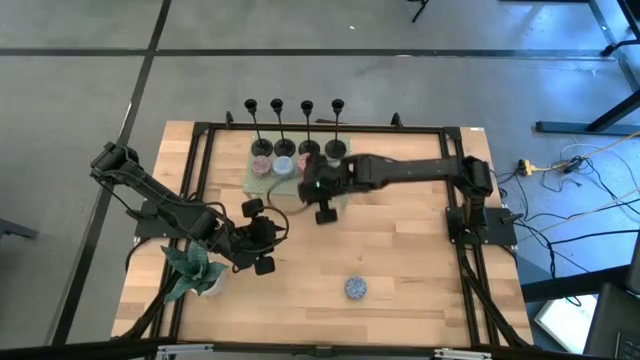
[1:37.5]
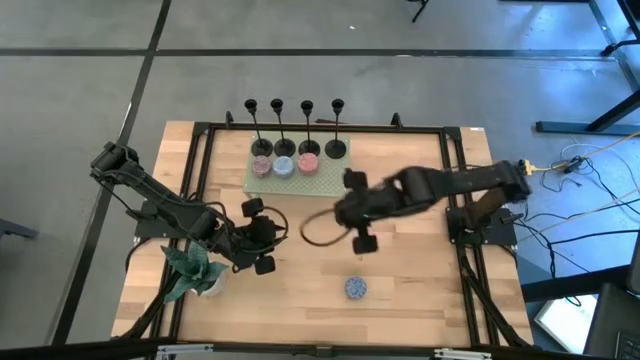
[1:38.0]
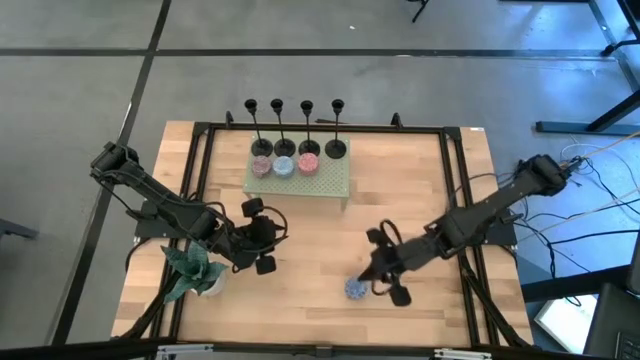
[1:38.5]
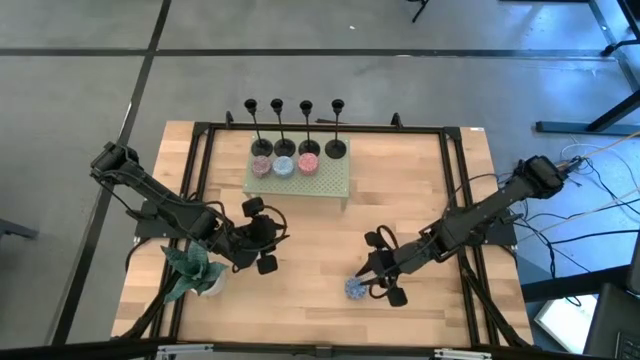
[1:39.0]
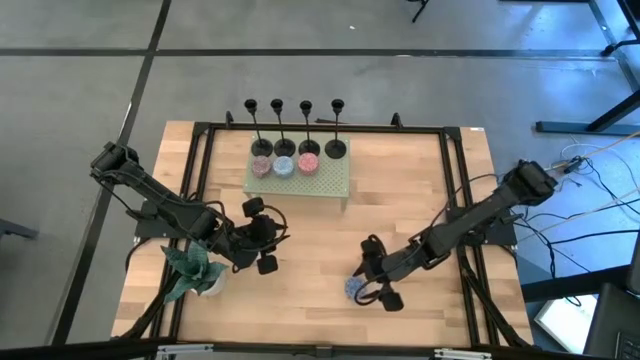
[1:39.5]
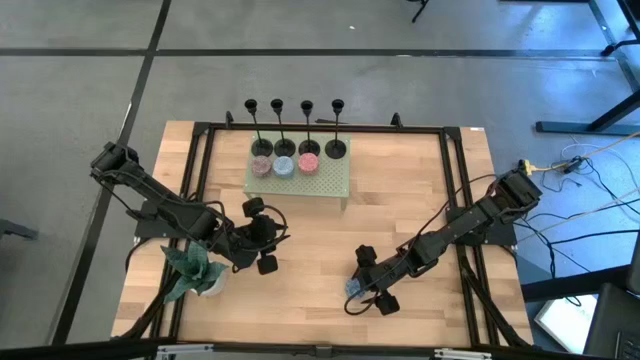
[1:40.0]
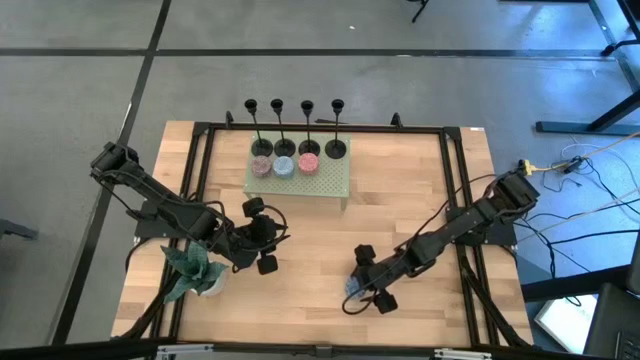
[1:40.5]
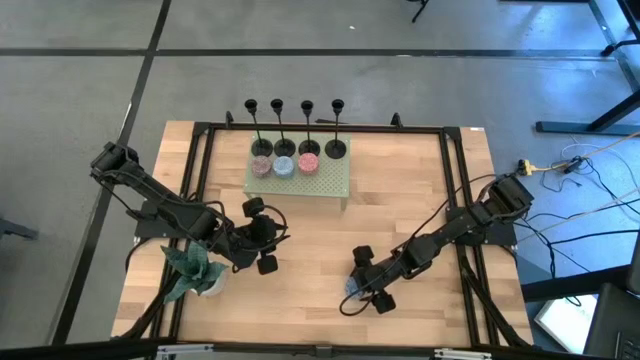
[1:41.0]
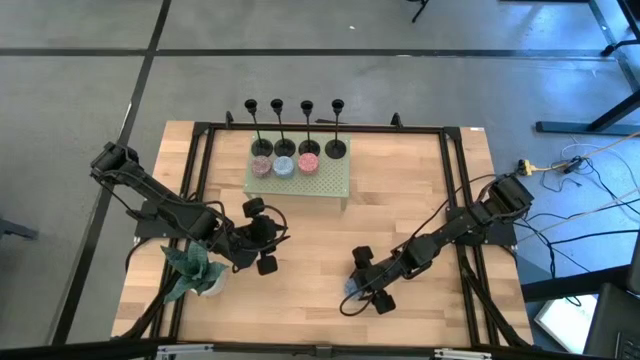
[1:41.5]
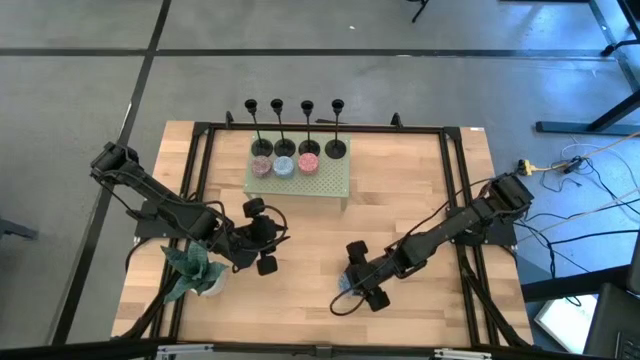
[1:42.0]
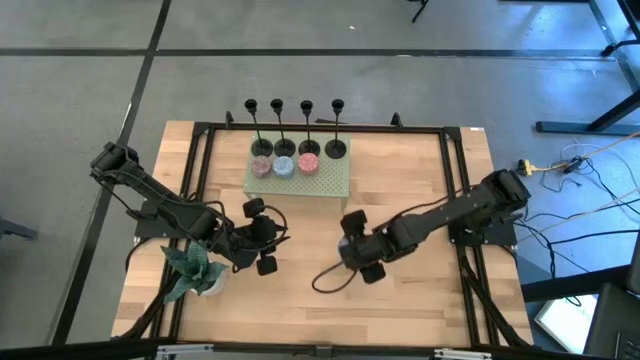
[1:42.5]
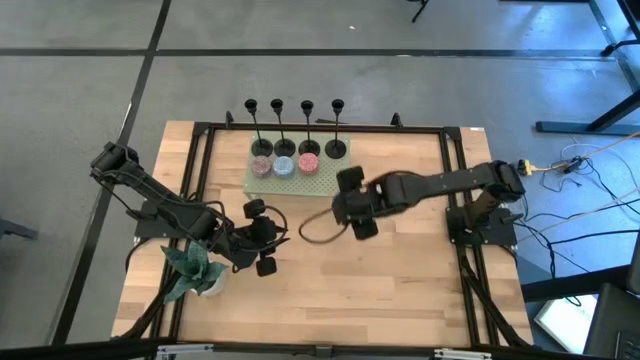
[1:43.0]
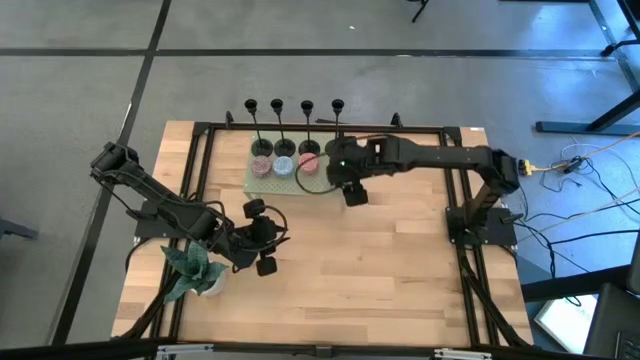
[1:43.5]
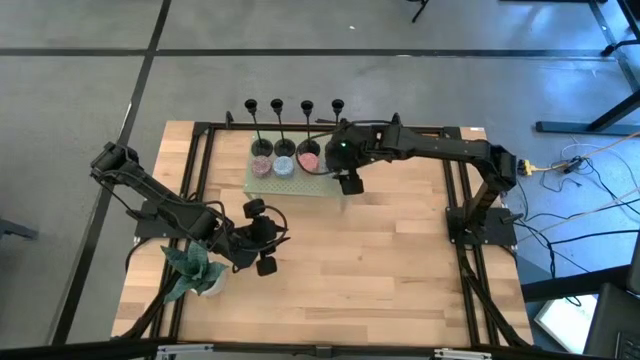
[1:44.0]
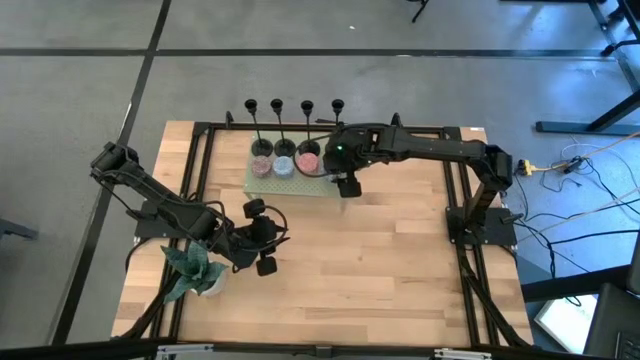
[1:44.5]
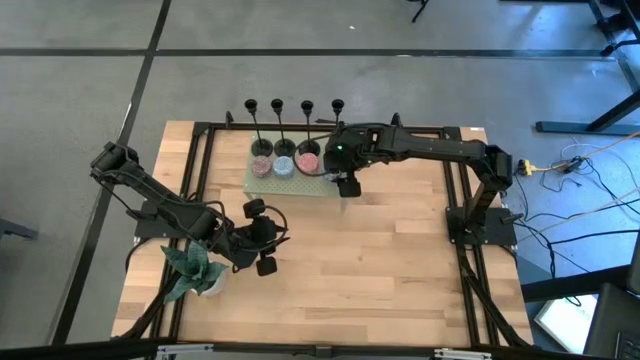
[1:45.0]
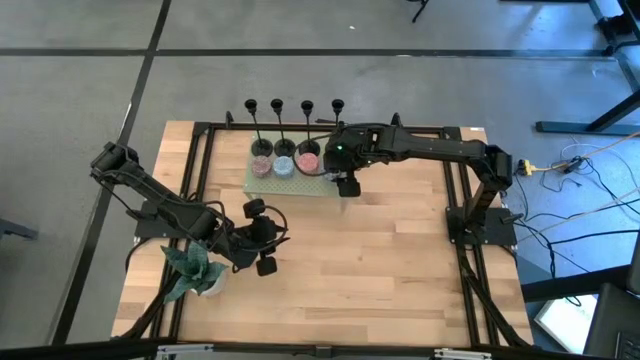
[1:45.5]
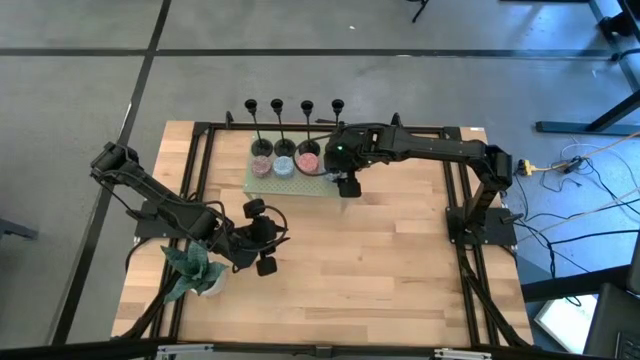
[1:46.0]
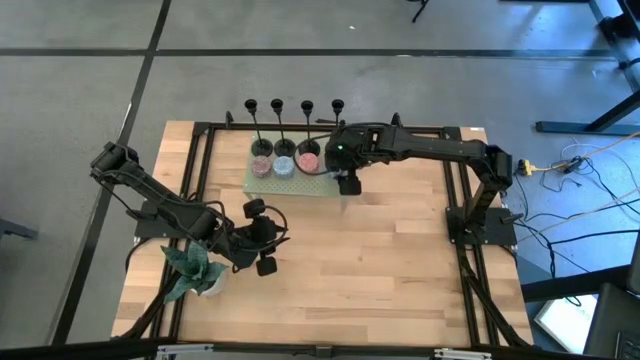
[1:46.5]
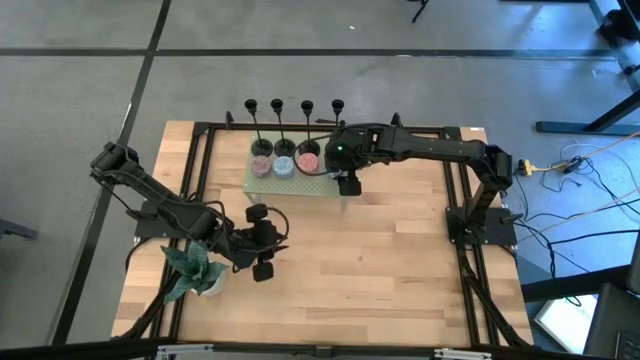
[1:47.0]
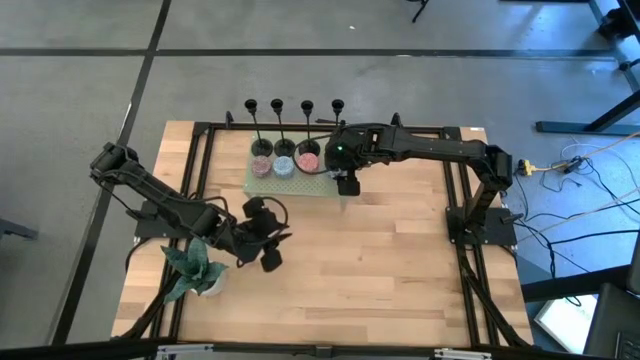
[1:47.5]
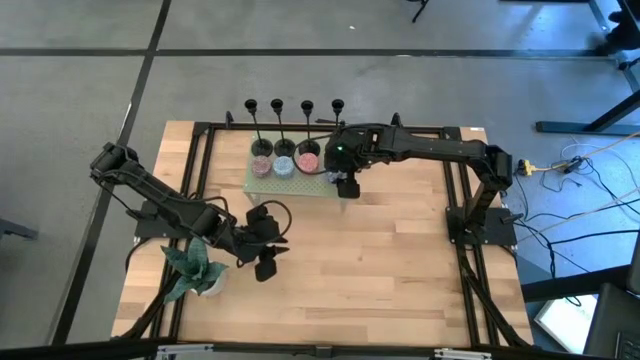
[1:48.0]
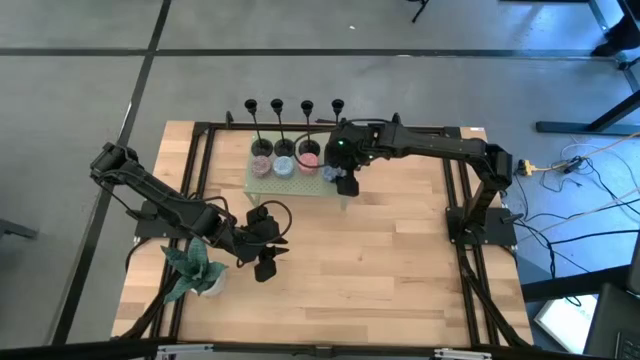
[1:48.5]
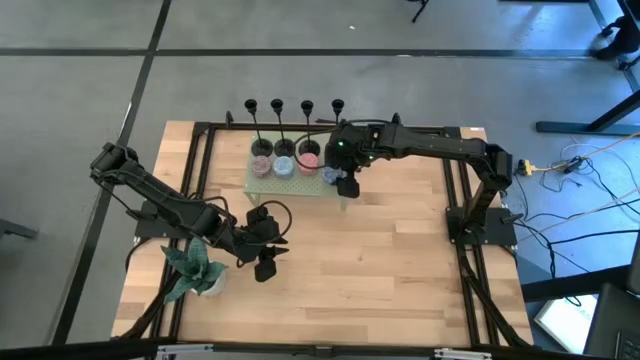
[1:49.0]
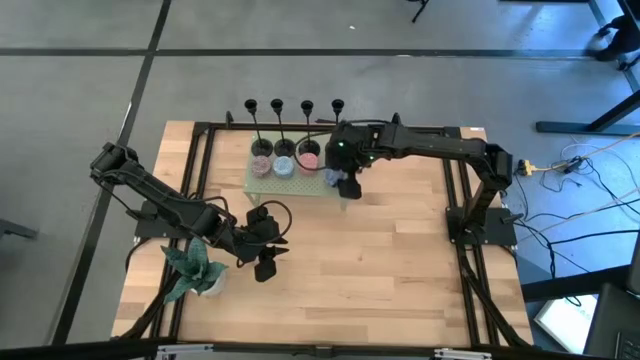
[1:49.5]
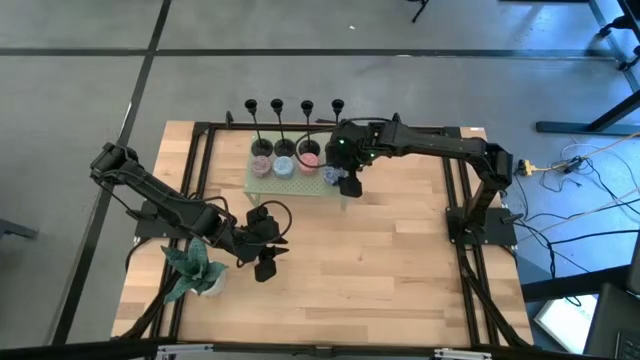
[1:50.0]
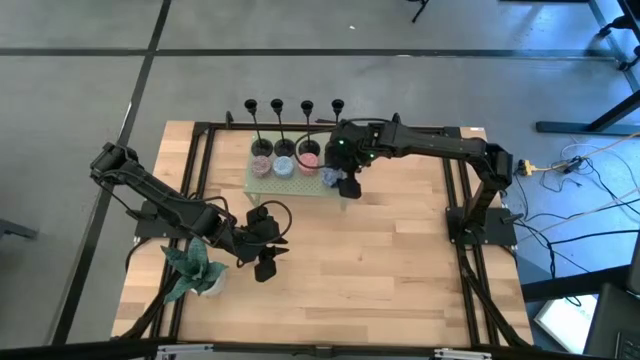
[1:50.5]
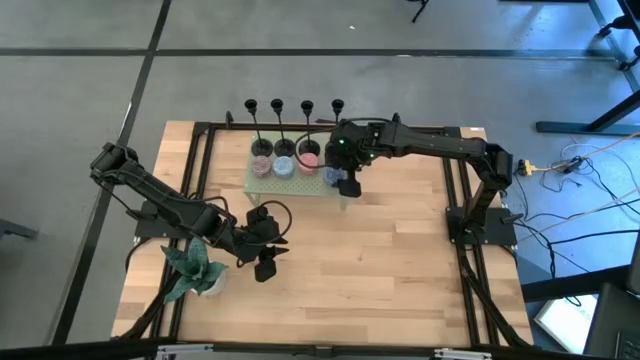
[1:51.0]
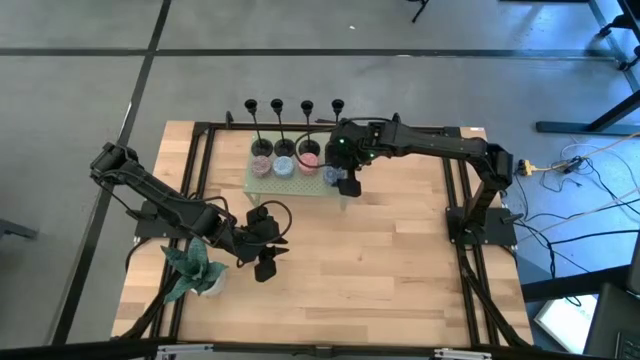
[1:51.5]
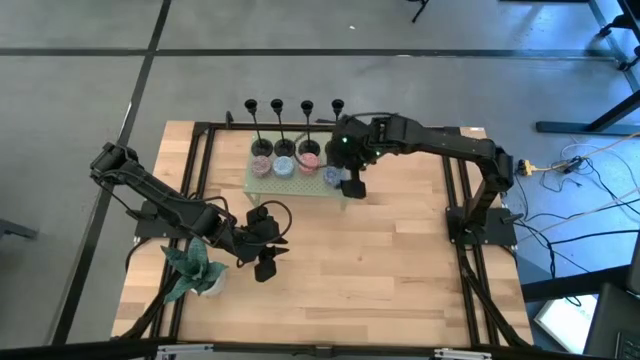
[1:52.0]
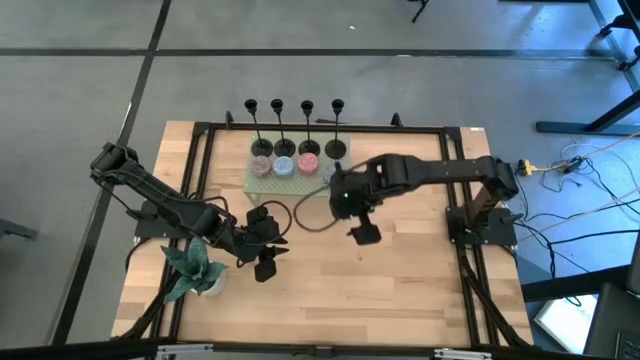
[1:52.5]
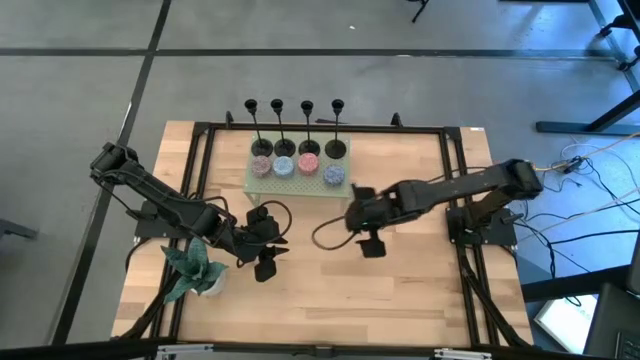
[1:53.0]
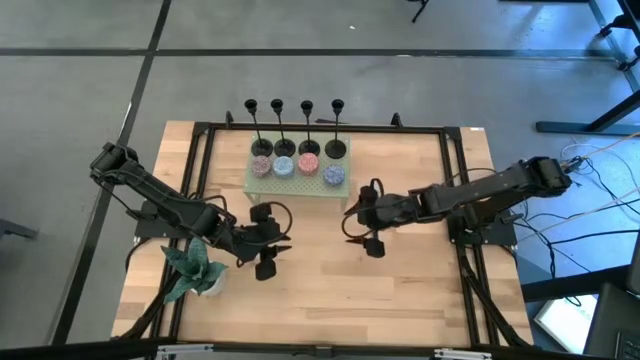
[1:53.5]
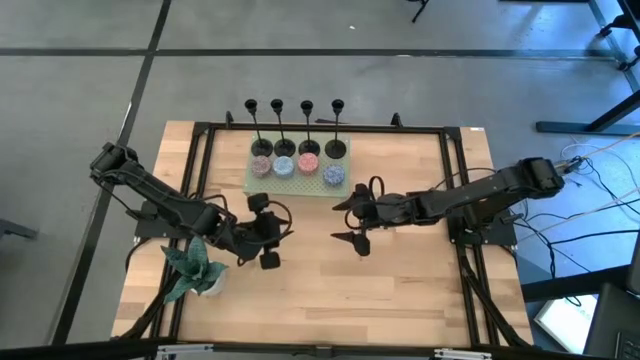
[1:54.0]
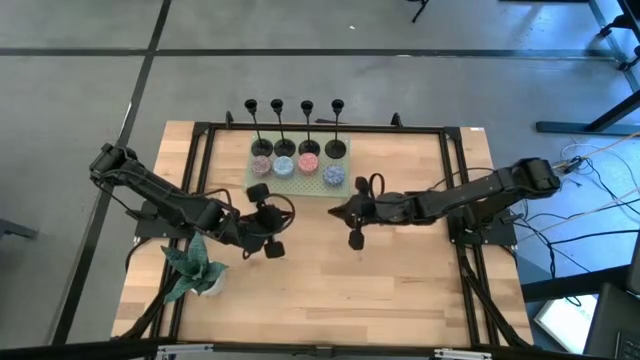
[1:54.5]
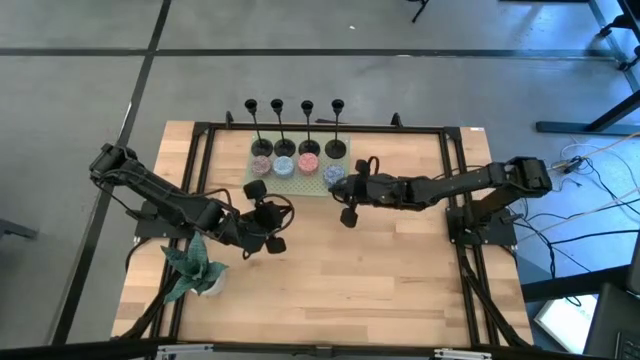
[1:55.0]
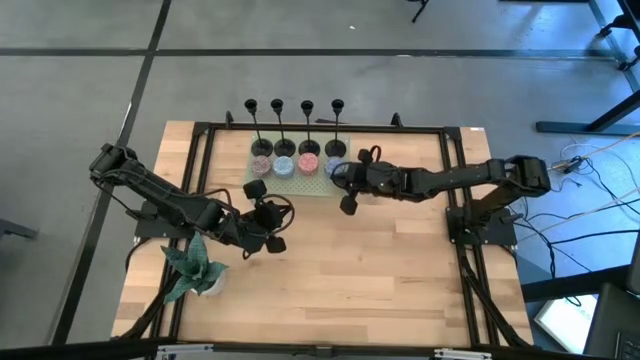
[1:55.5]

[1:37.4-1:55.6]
Task: Pick & Place candle stick holders
Align the blue scented candle with the pink scented candle on the shelf
